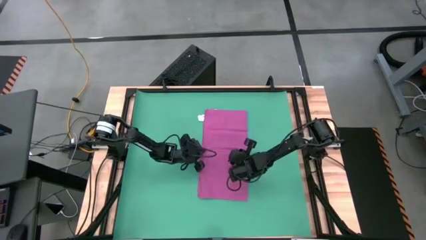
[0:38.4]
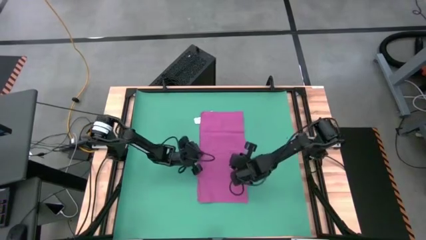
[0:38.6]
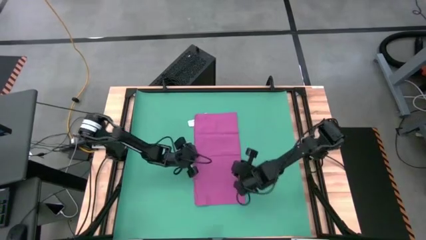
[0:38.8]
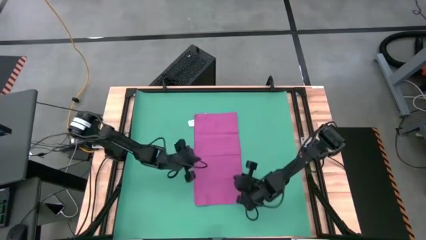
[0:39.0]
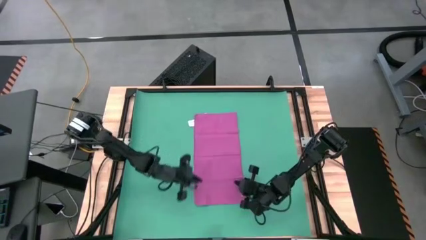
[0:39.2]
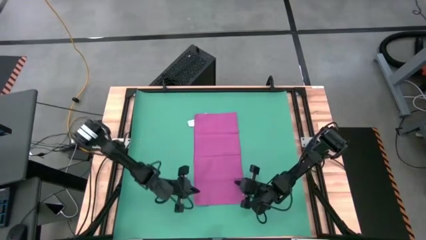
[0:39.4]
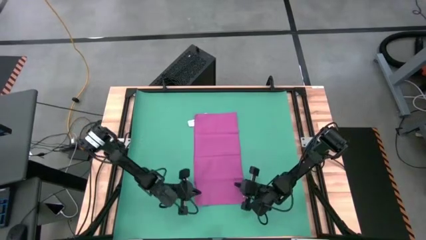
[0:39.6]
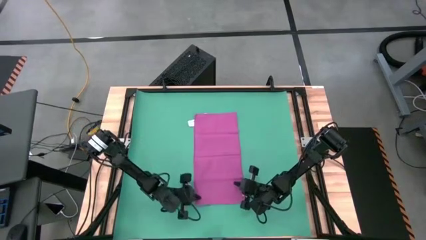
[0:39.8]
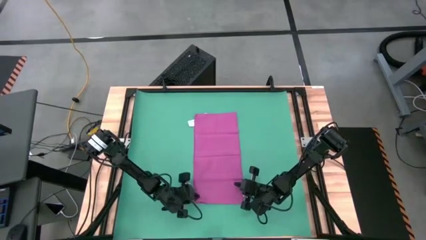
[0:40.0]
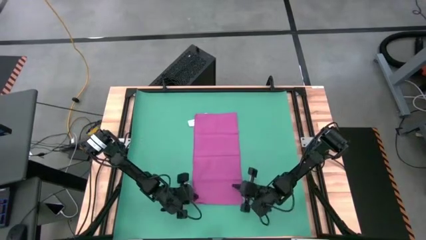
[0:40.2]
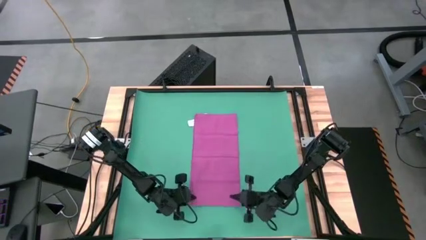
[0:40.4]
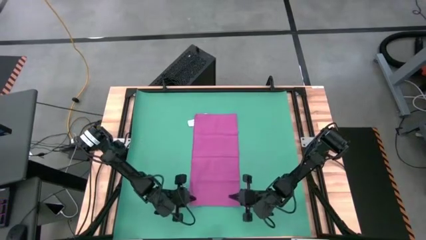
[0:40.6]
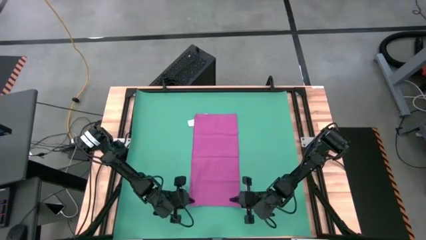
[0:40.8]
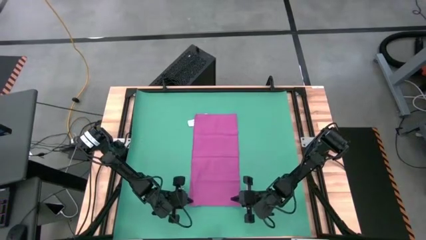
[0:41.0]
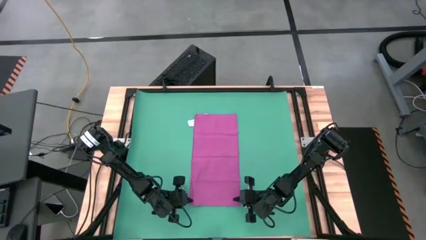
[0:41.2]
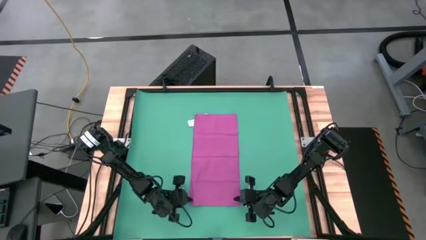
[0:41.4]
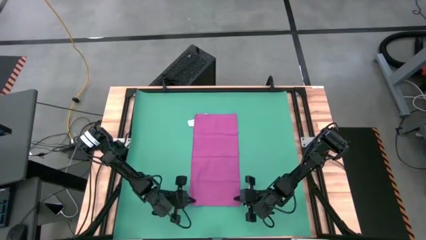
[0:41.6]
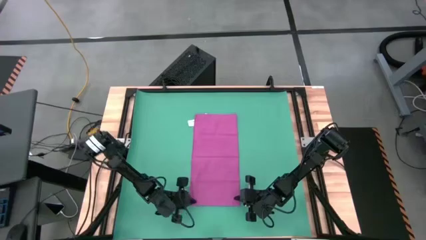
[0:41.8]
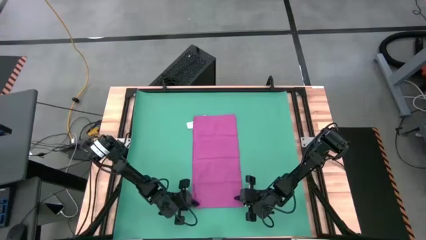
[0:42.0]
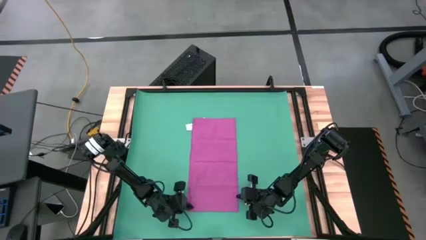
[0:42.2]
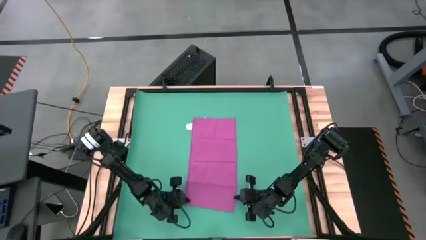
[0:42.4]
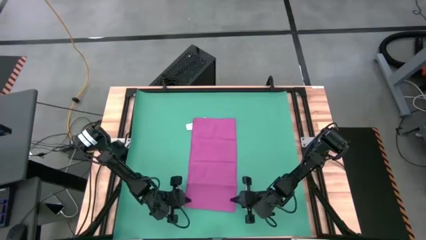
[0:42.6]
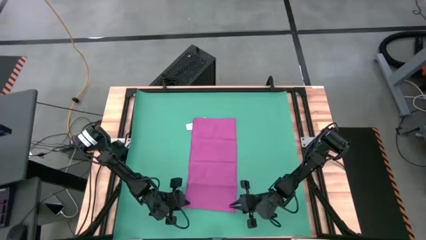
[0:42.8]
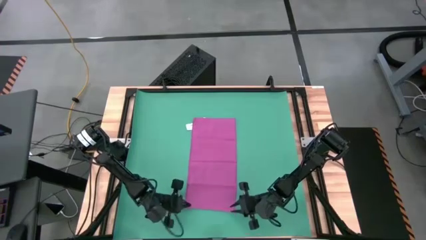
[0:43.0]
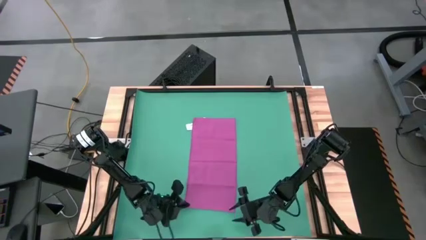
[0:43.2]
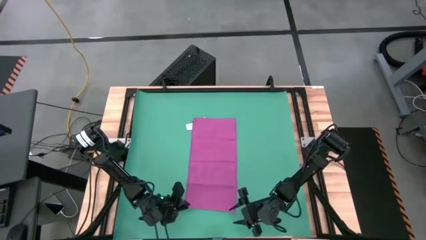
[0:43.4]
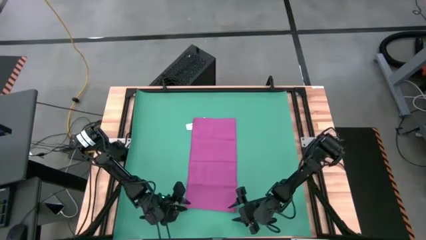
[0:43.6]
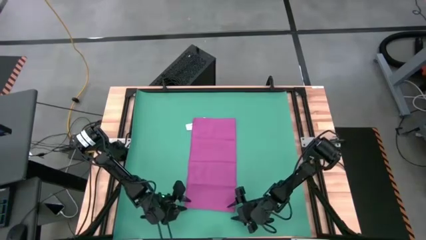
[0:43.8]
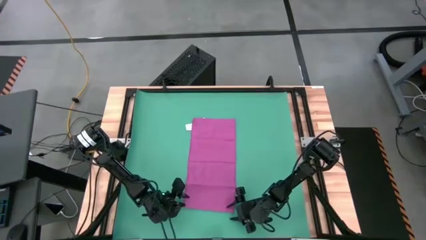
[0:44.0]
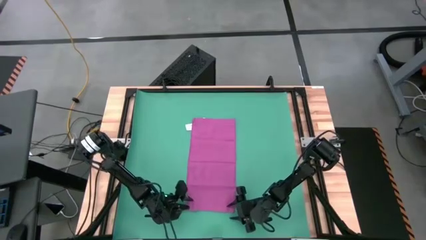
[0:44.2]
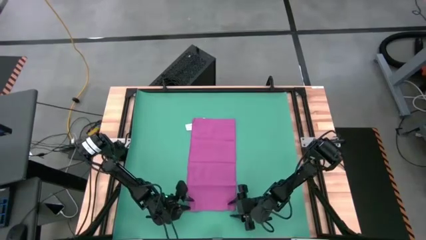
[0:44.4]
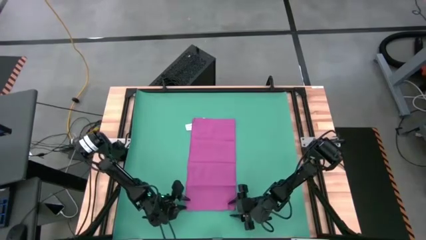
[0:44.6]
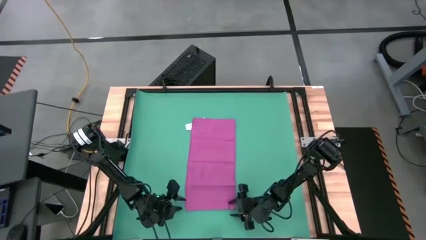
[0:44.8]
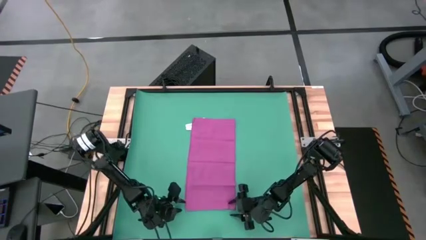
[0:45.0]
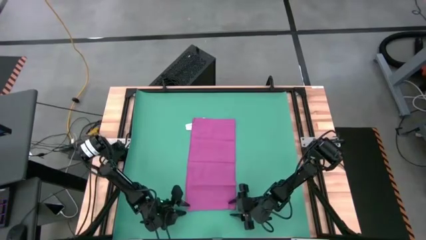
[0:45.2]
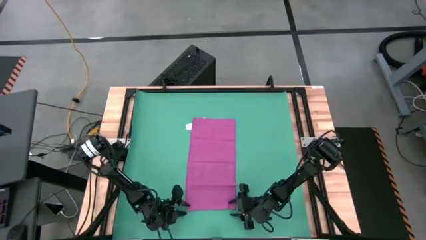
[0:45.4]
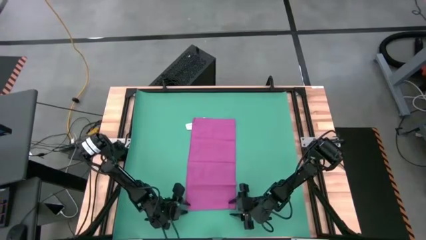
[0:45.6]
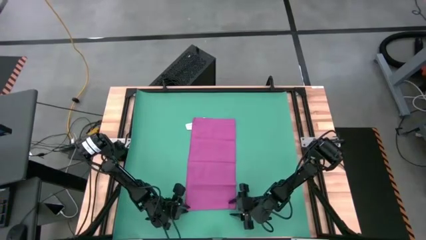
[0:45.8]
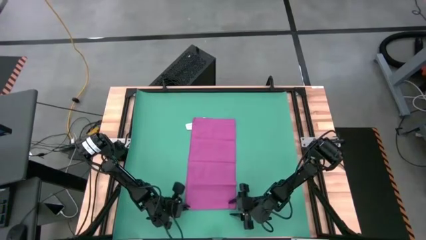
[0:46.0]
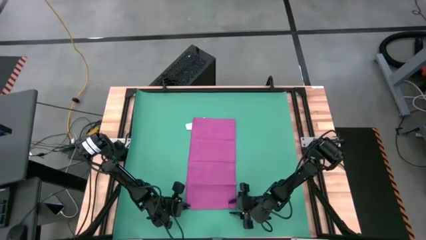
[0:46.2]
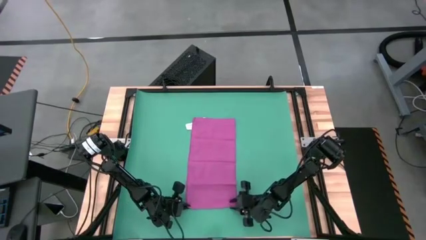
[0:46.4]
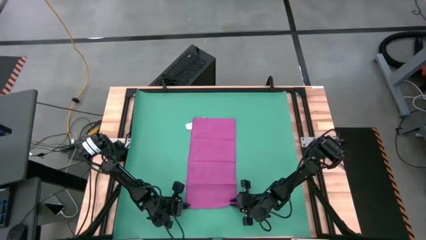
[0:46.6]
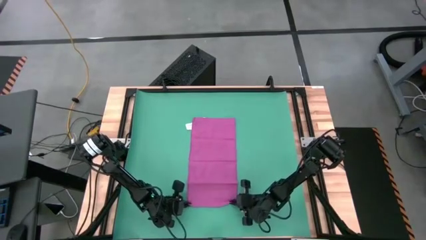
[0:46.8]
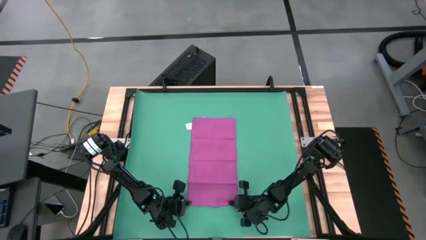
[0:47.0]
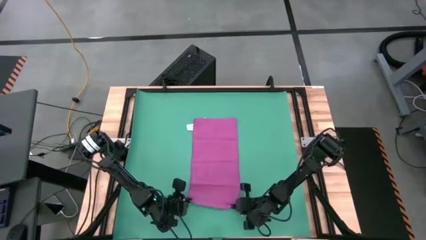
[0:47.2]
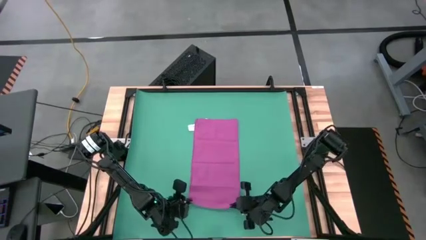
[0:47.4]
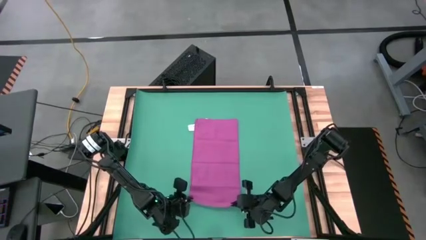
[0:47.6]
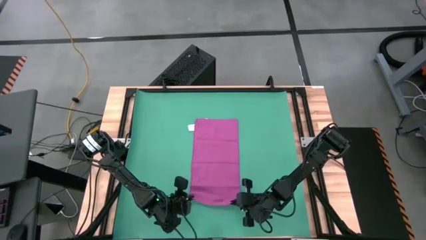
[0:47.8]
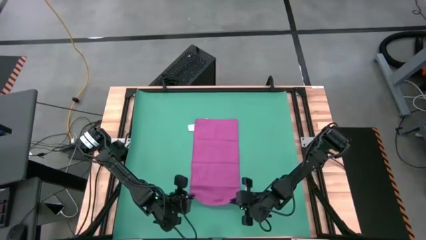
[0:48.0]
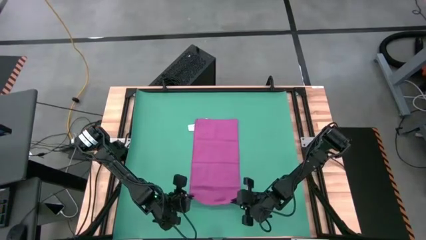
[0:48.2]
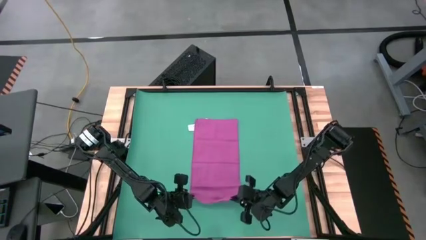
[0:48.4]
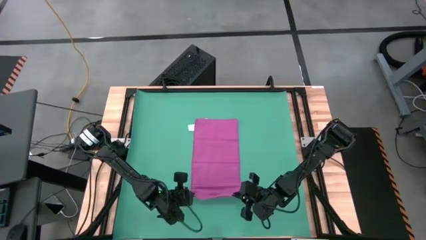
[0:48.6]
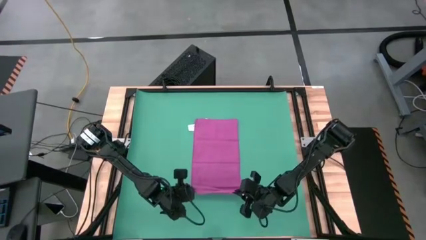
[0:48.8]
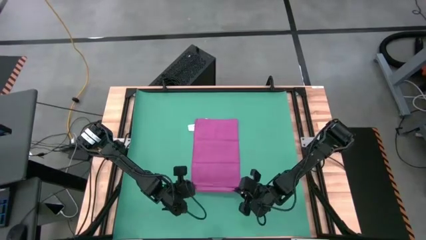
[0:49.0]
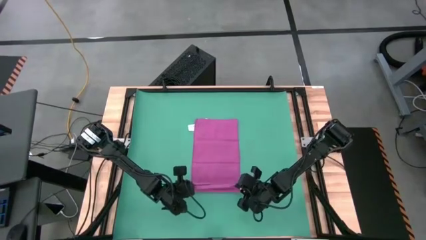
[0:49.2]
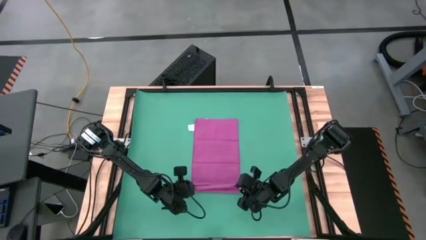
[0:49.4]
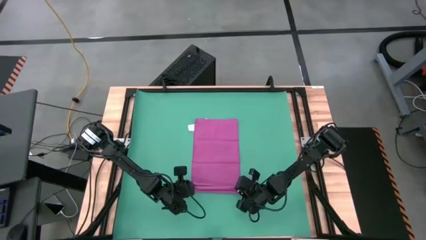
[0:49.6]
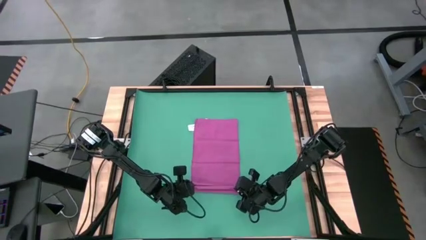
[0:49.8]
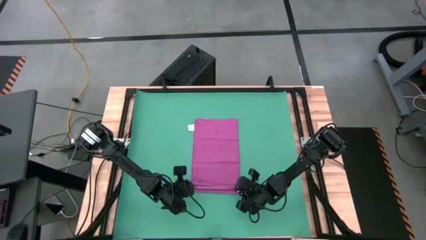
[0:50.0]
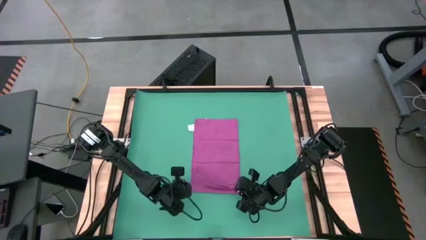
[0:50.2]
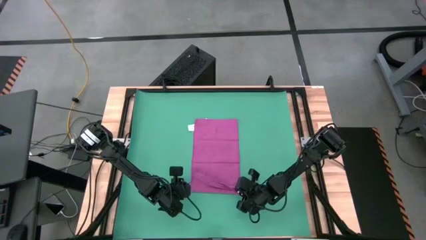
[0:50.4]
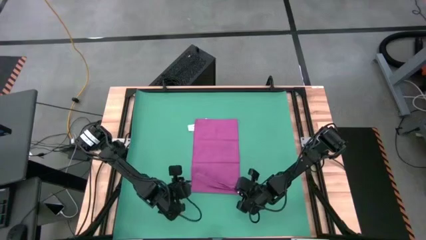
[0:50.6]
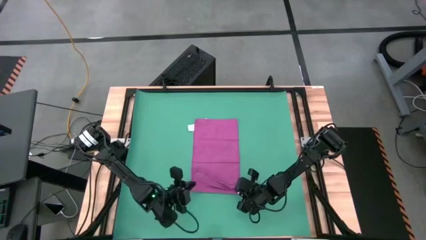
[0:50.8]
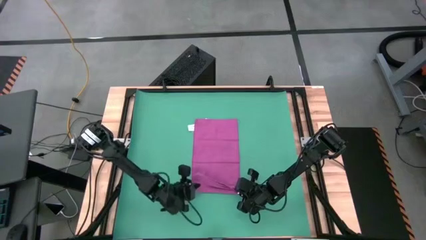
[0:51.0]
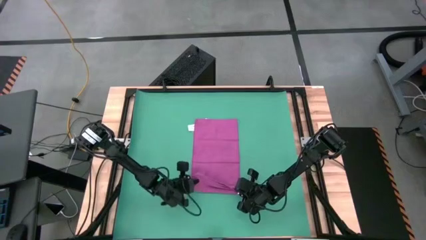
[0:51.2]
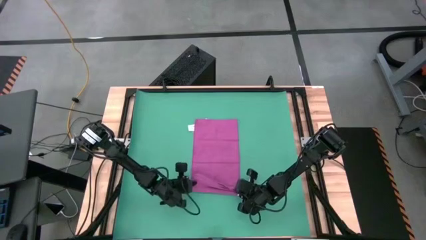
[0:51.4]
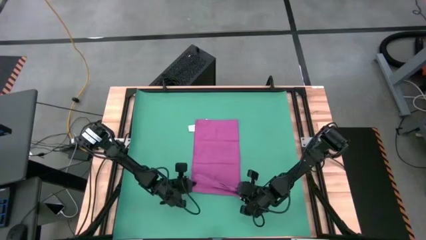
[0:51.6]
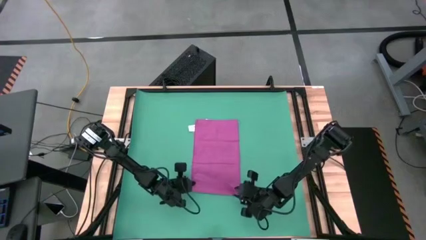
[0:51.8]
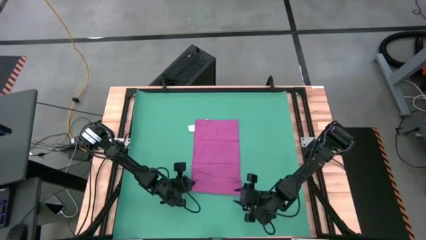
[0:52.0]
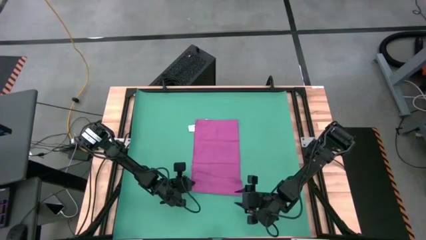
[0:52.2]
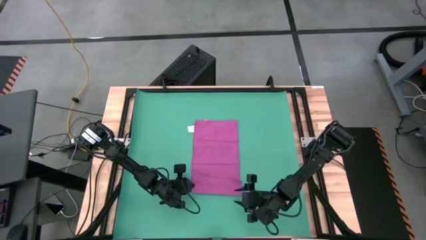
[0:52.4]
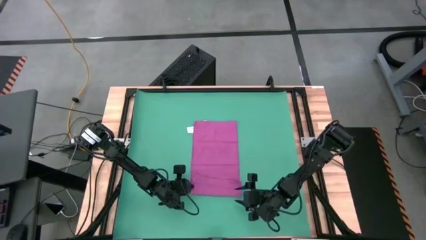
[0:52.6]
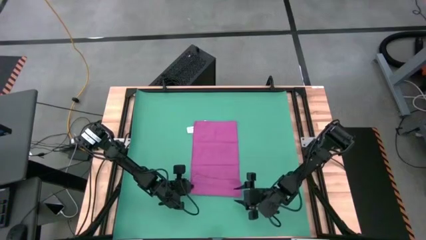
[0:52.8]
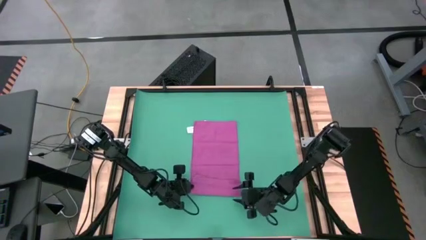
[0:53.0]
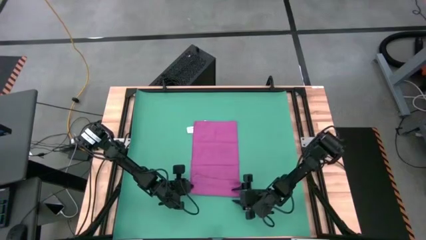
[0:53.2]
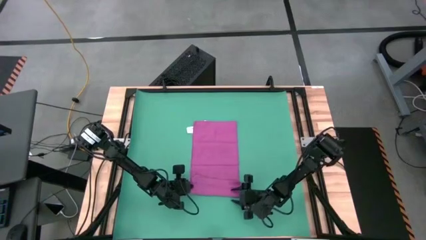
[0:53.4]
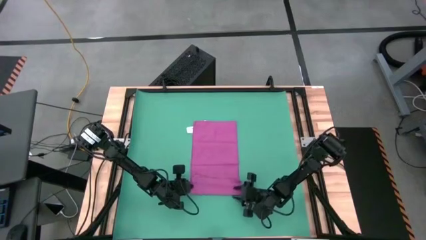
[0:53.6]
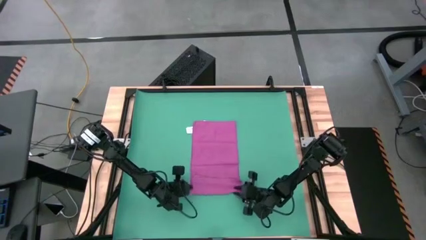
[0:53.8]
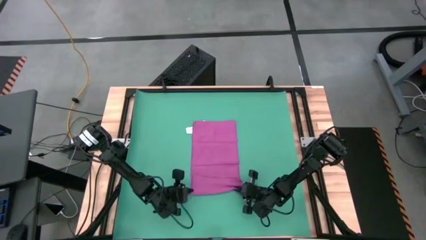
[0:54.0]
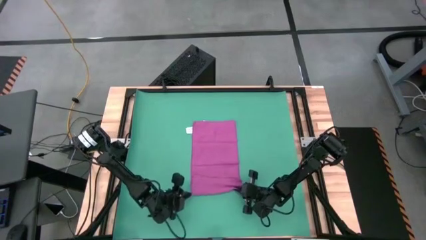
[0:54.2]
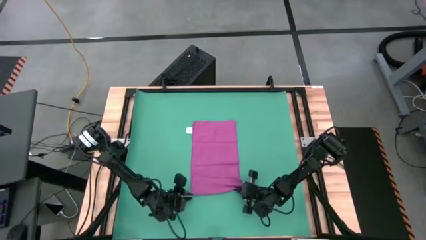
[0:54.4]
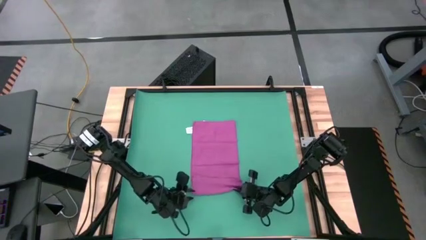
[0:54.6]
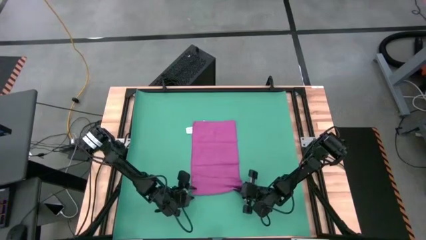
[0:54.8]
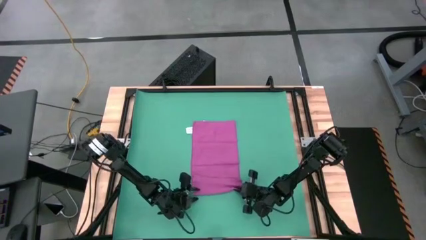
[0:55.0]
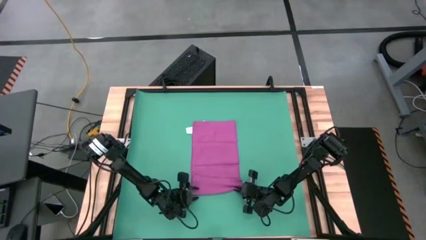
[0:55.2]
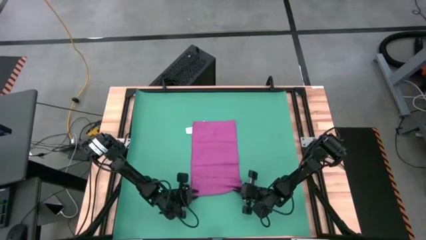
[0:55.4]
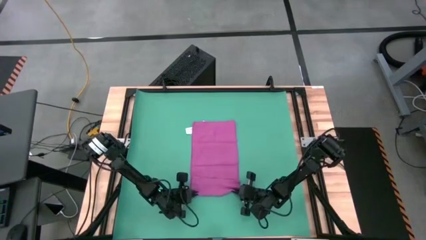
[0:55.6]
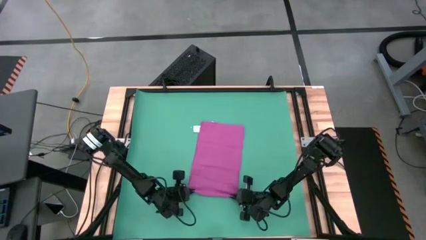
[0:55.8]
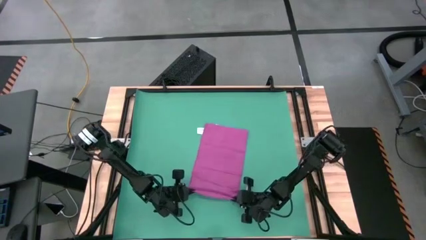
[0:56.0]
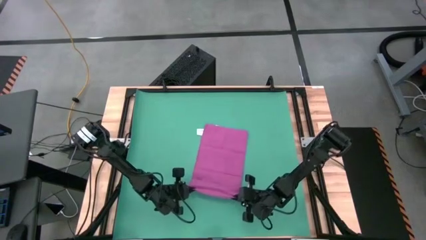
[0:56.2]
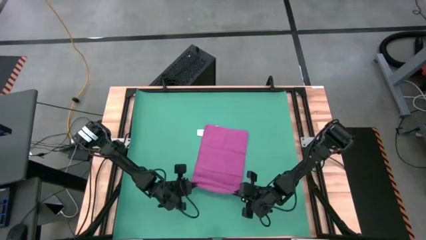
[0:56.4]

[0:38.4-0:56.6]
Task: Roll towel
Roll the pink towel
